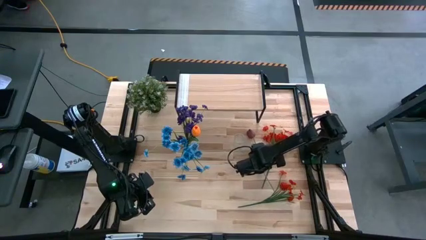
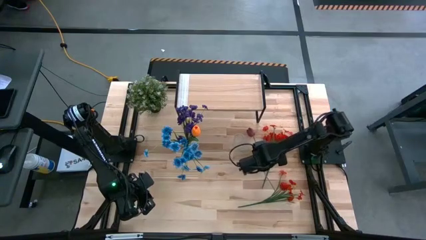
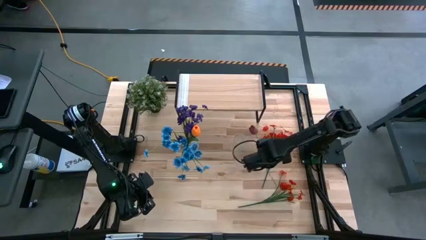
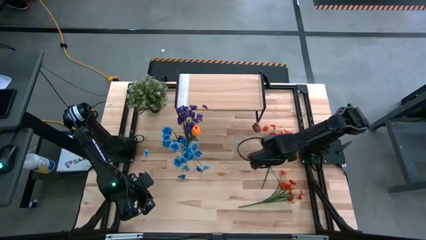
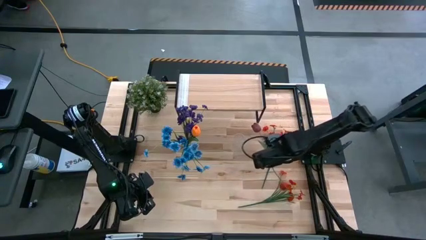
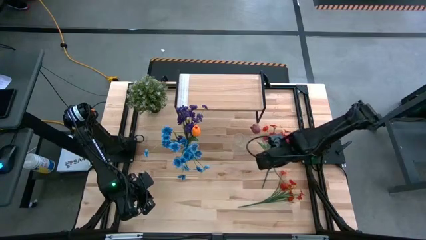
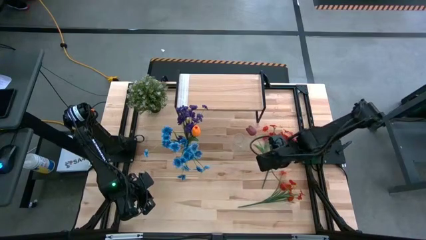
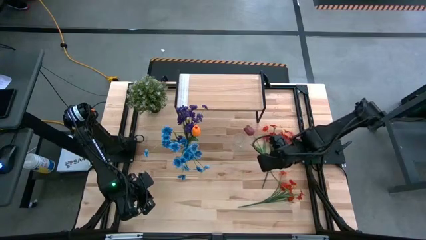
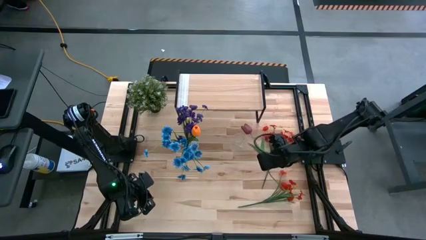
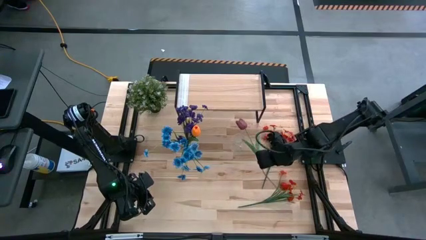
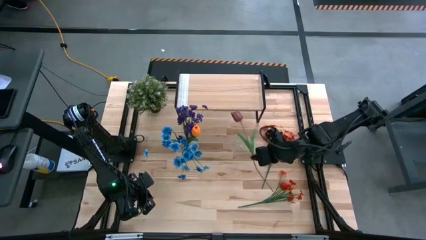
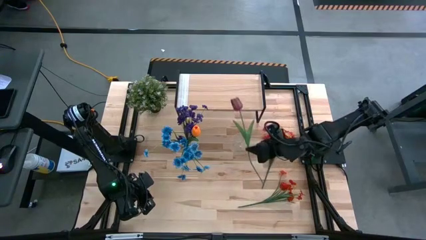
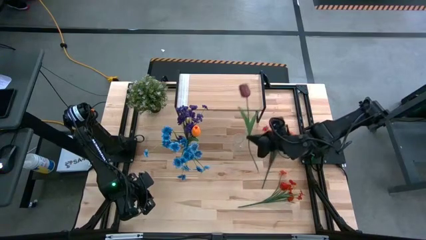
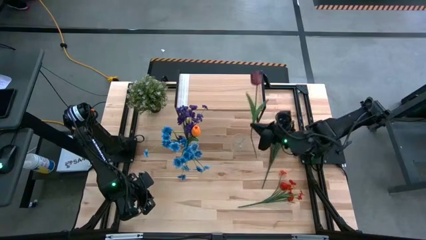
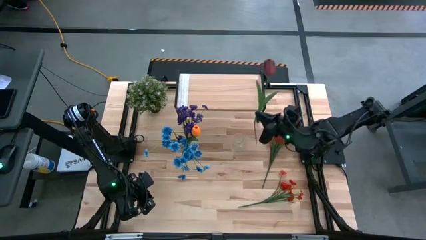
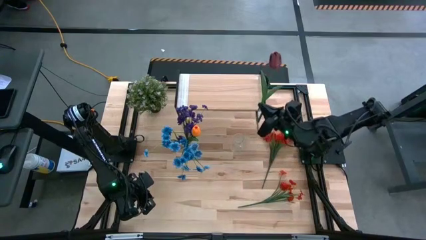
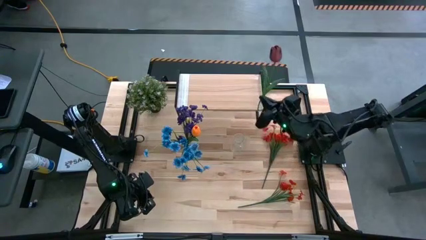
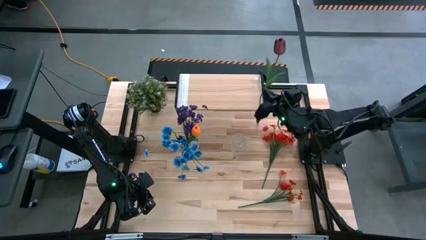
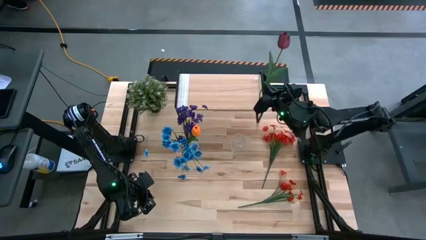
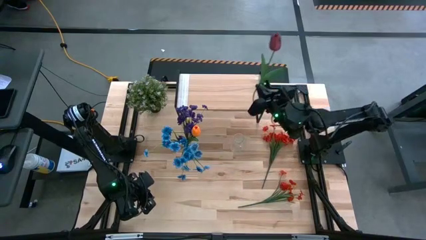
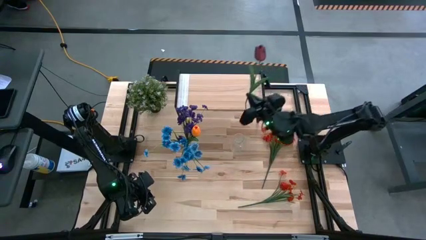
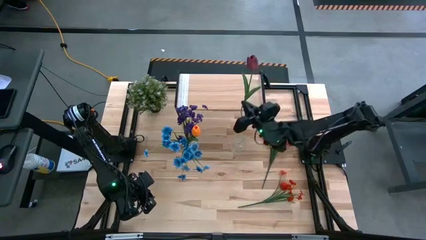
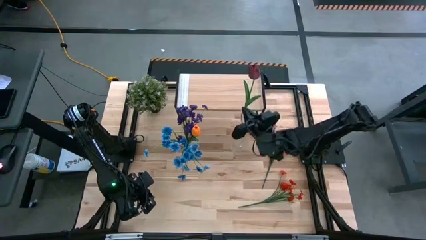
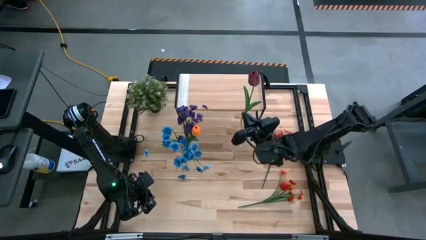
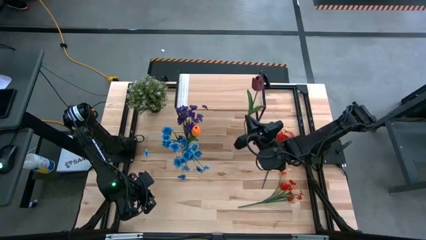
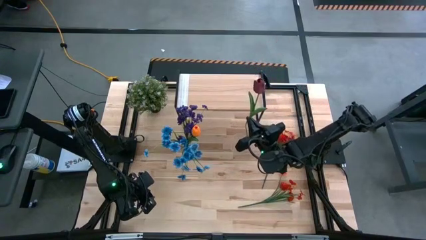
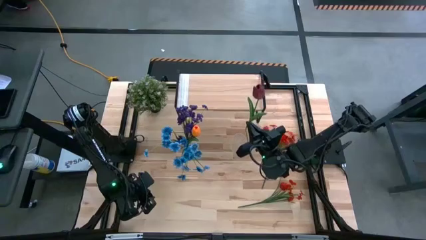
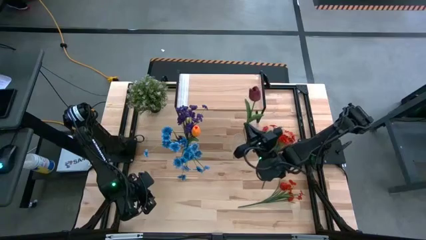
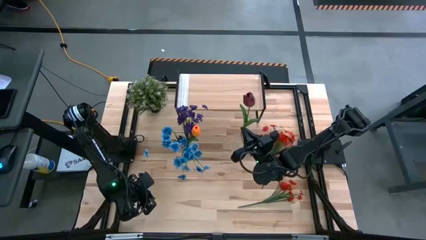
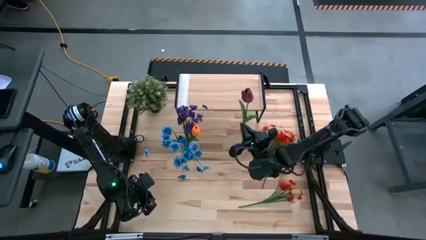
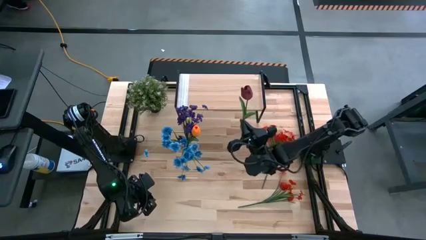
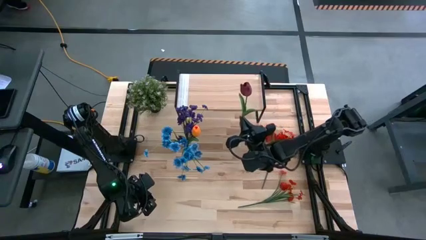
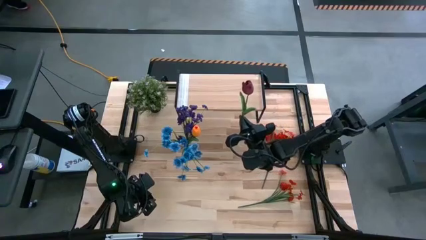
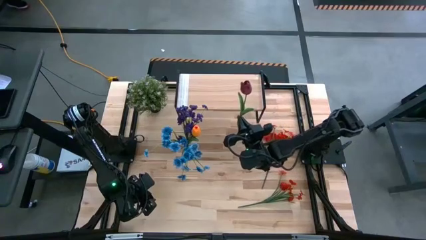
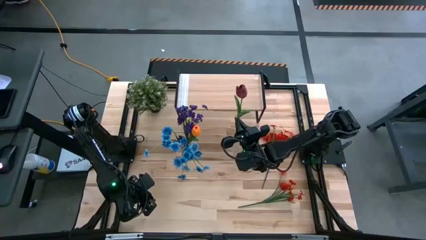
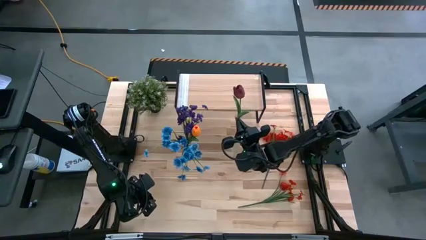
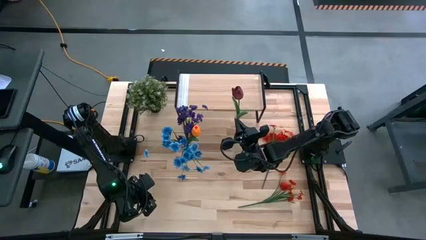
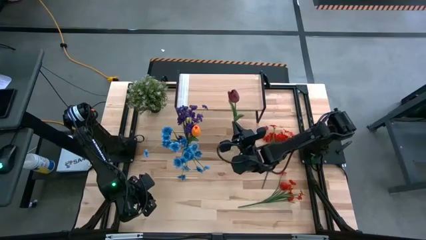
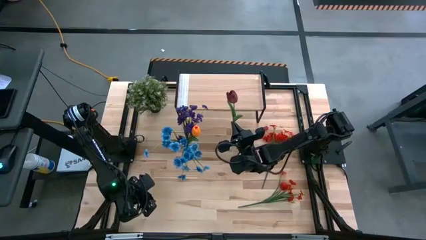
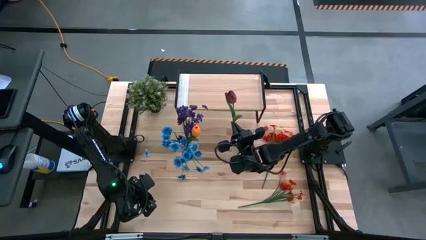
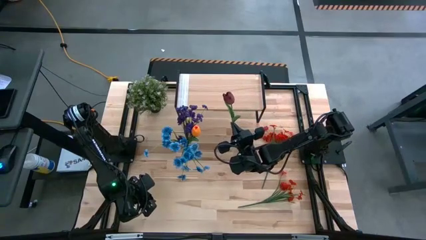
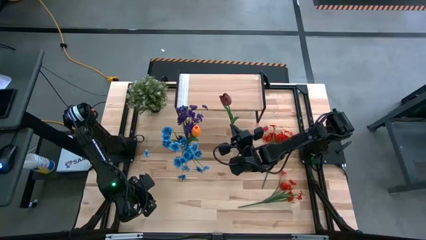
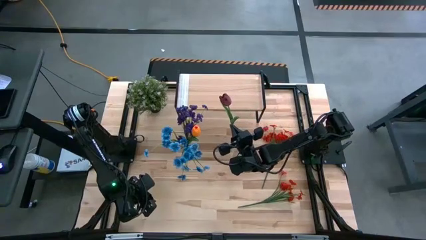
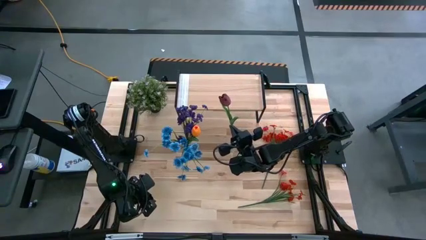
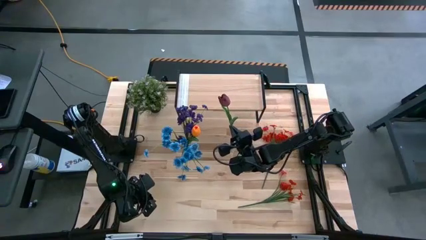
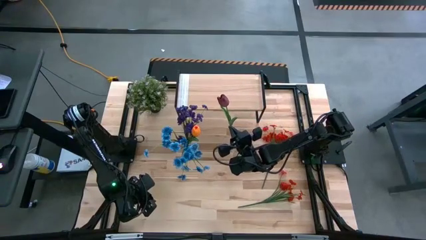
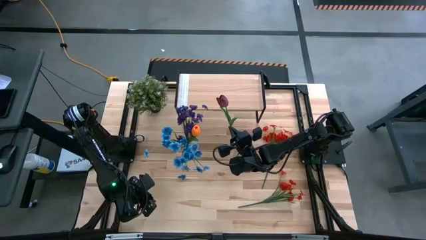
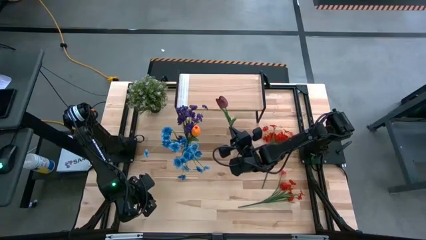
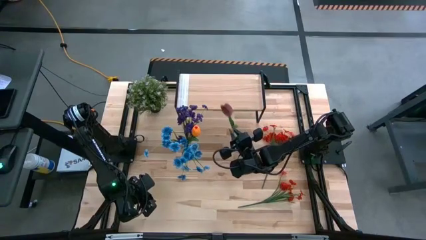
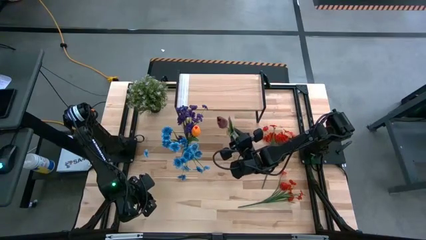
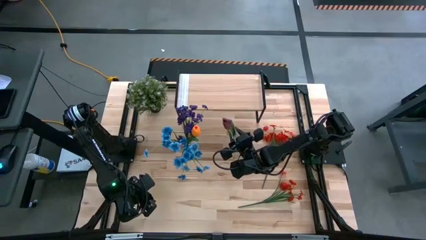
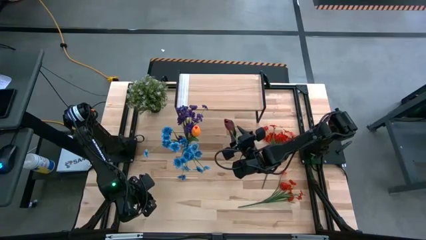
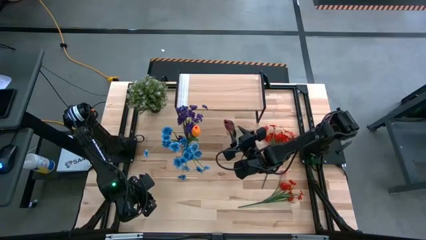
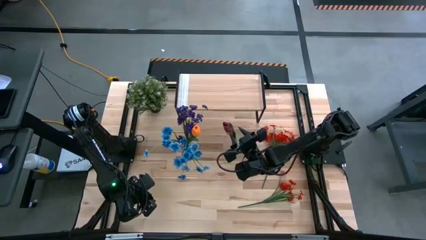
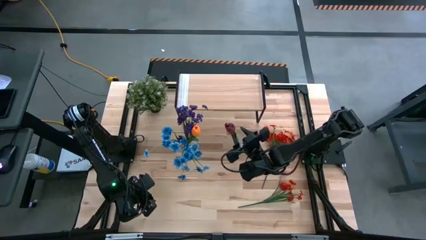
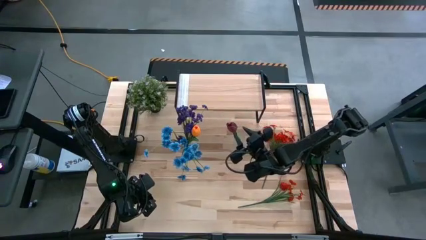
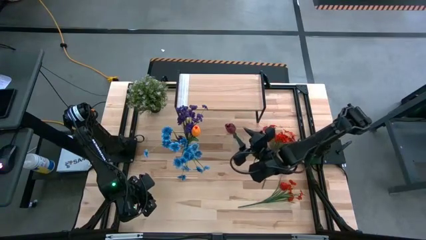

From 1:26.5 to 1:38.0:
Task: Pick and place flowers into a vace then onto a shelf
Put the red tulip into the right transparent vase
